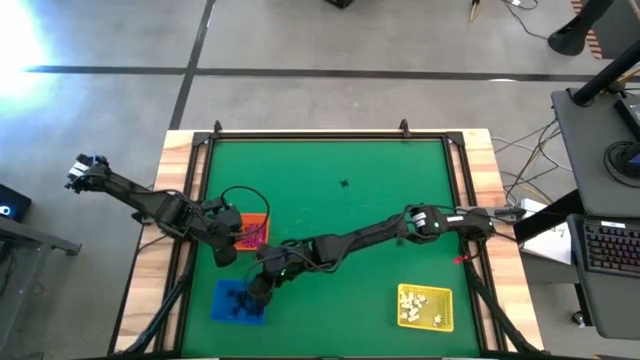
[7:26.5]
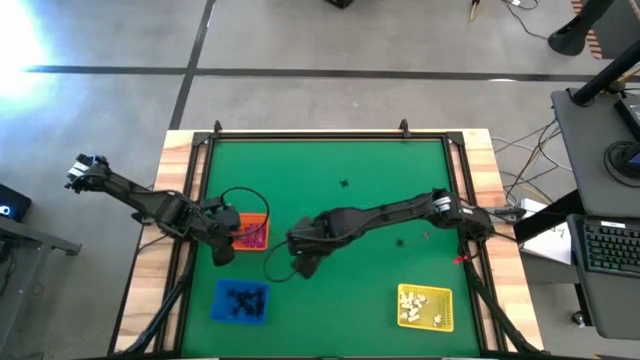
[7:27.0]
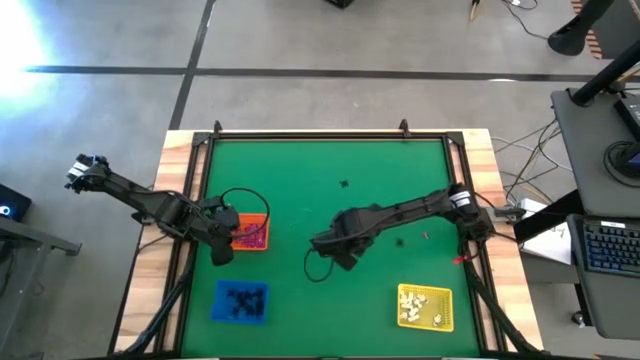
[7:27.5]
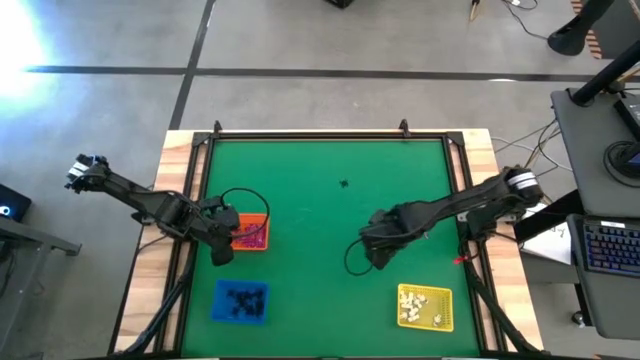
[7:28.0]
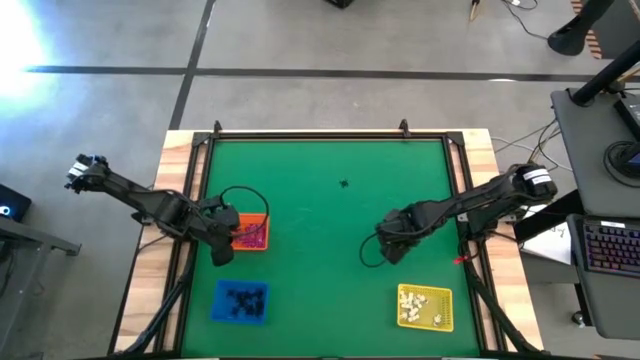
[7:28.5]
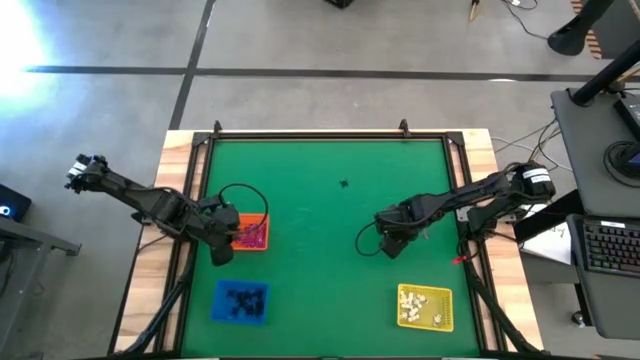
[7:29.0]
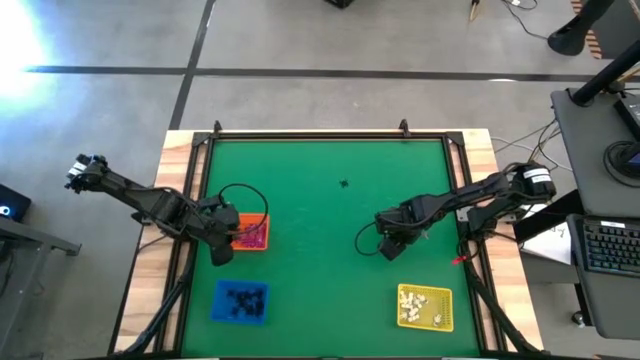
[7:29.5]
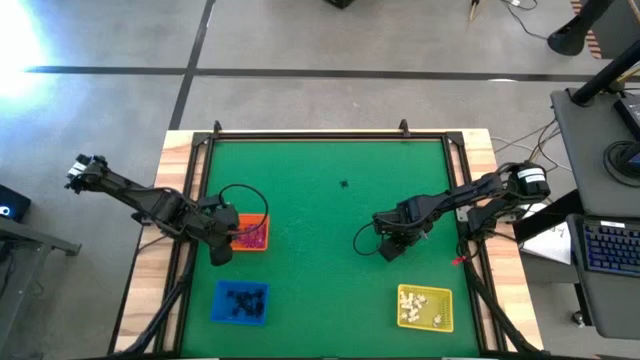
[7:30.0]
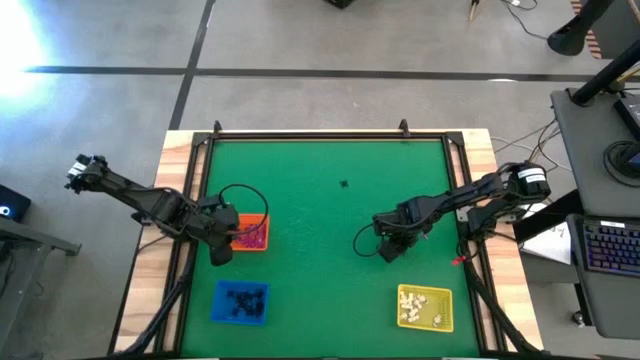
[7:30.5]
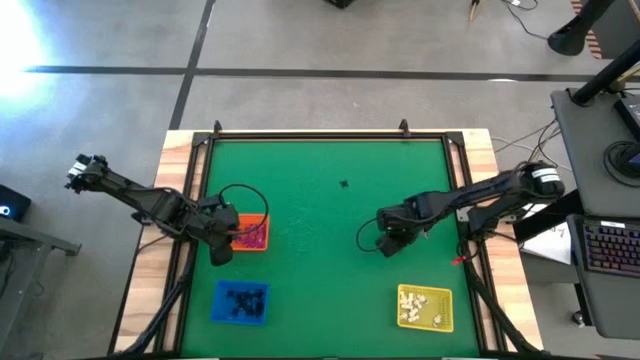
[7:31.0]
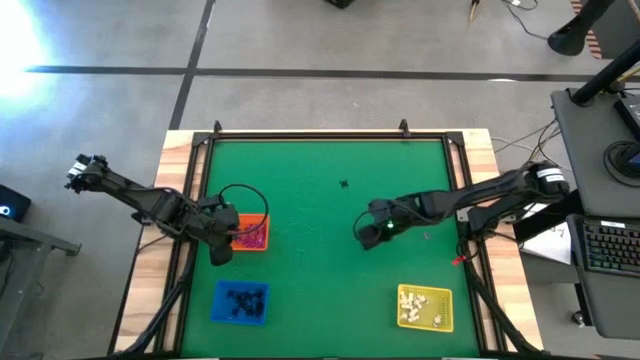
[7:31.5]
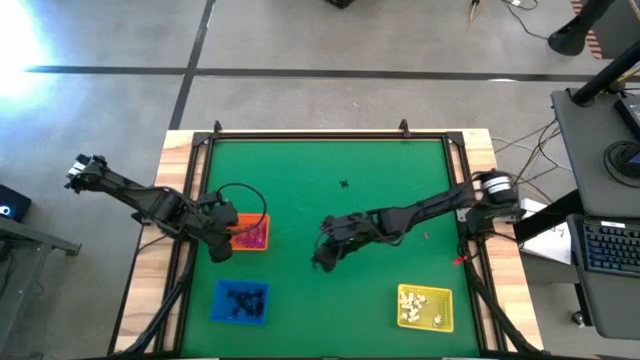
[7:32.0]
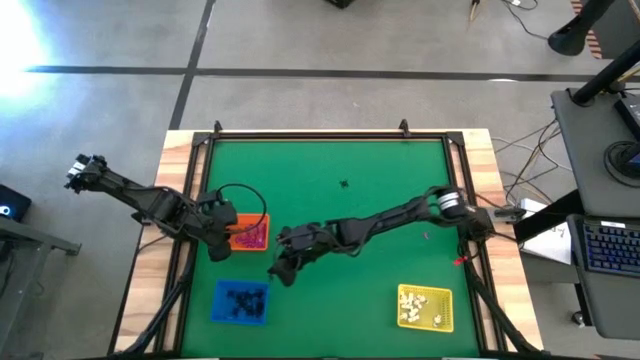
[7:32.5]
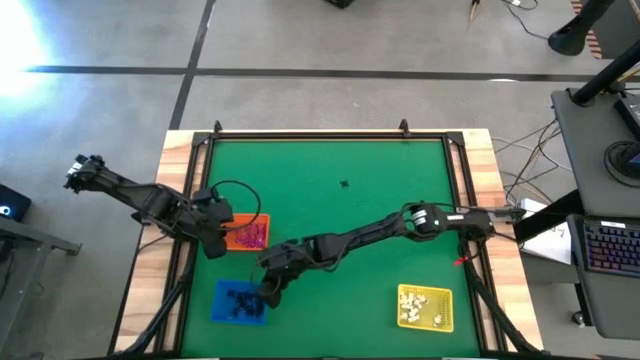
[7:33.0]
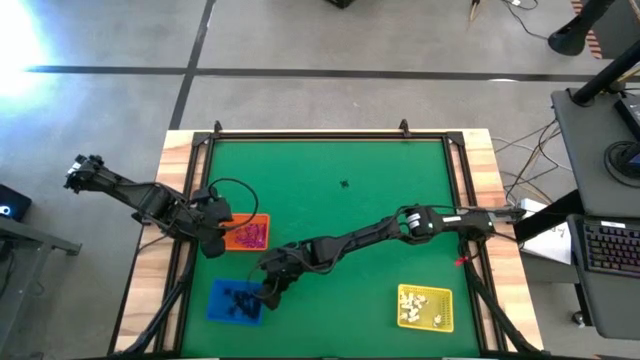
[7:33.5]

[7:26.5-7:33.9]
Task: Sort Halloween decoration
Put the black spider toy into the blue bin

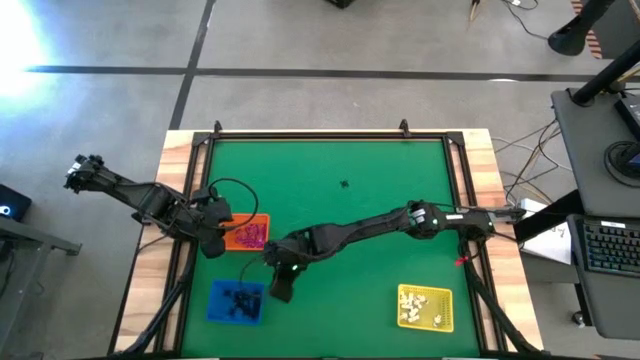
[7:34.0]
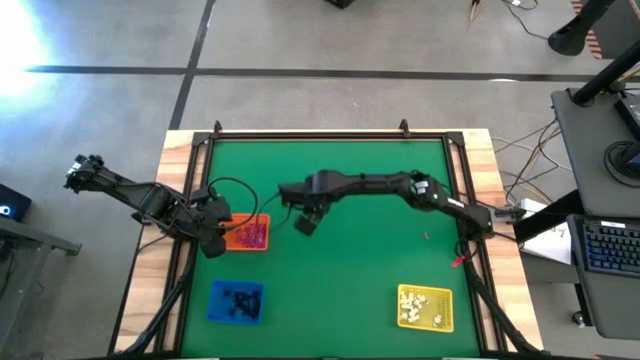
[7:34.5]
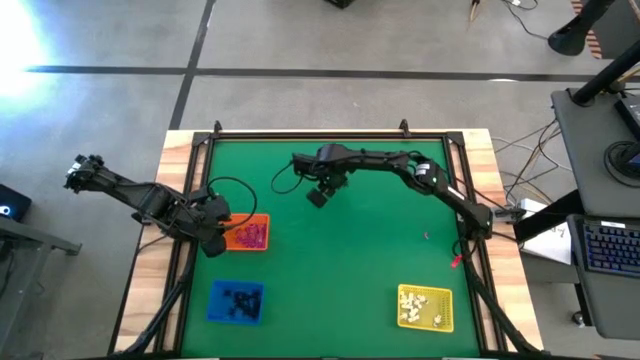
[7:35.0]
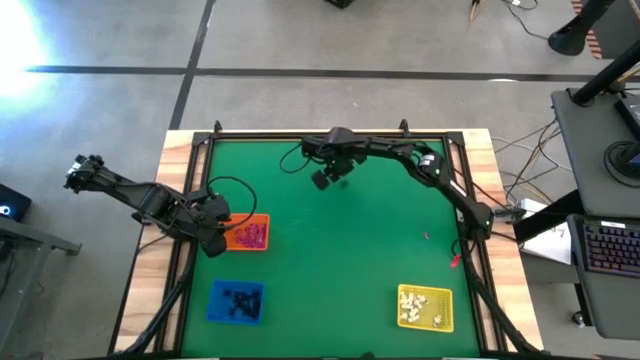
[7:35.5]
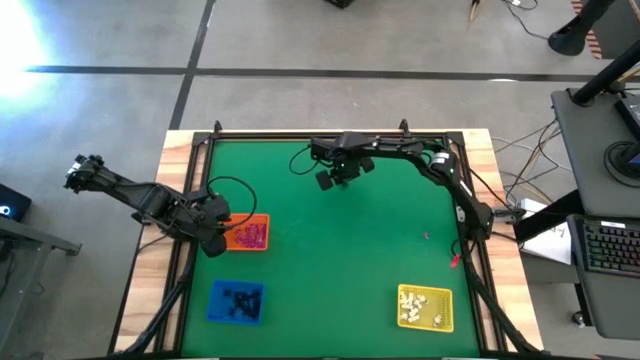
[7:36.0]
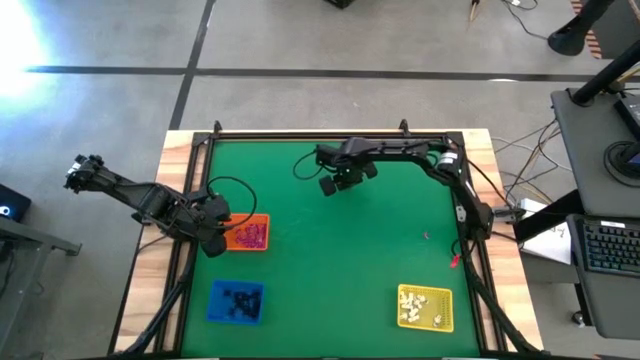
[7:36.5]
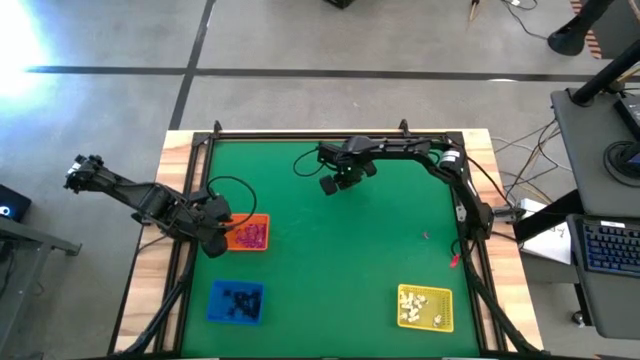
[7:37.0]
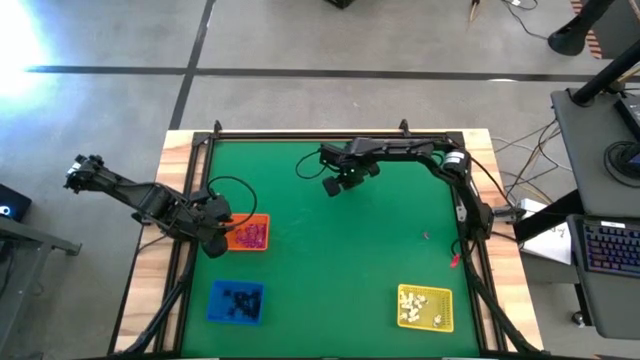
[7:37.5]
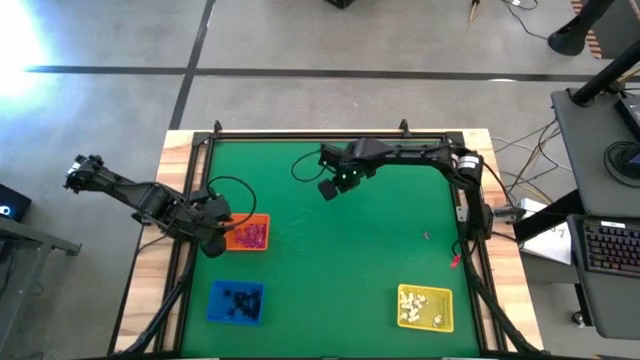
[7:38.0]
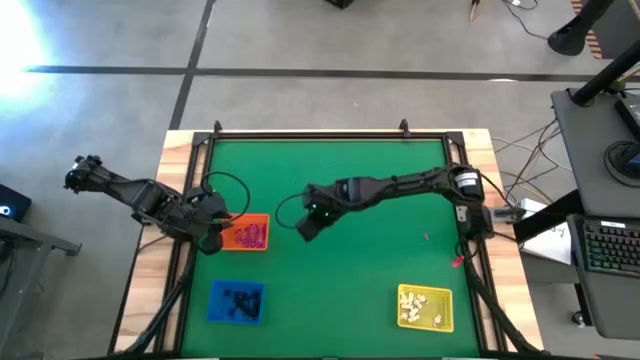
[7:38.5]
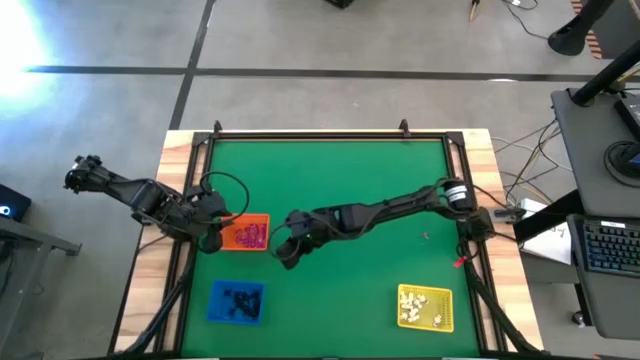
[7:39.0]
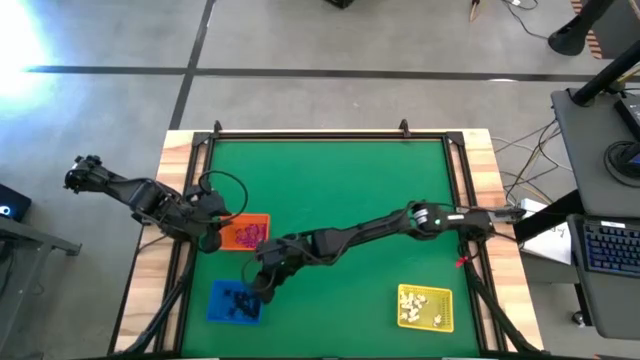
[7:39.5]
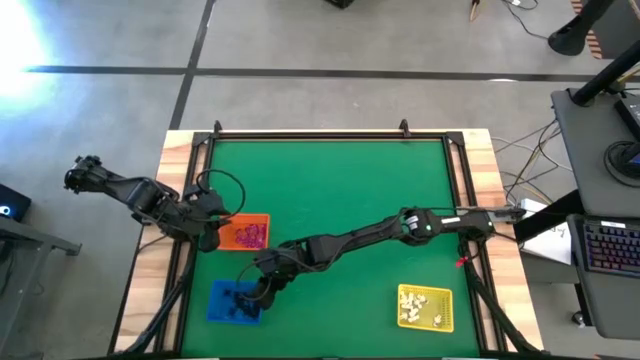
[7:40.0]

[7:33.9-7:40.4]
Put the black spider toy into the blue bin

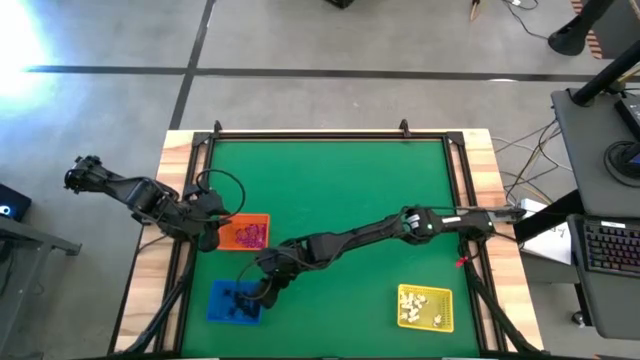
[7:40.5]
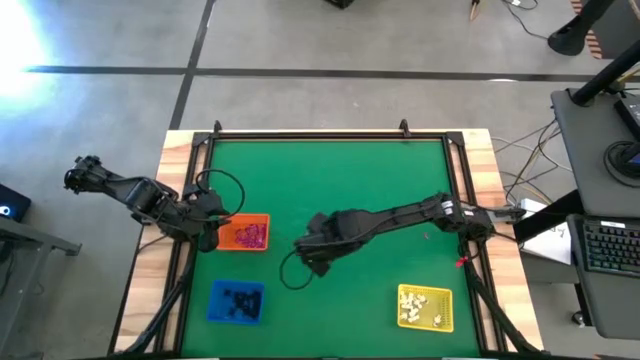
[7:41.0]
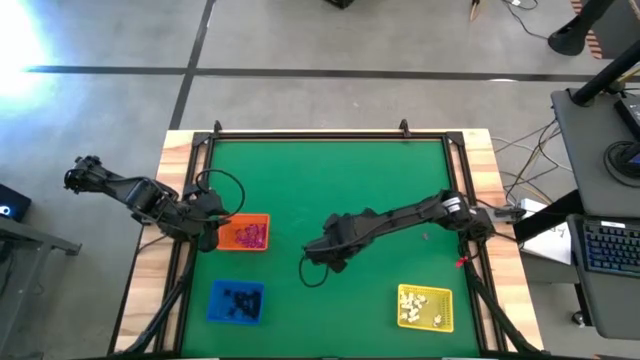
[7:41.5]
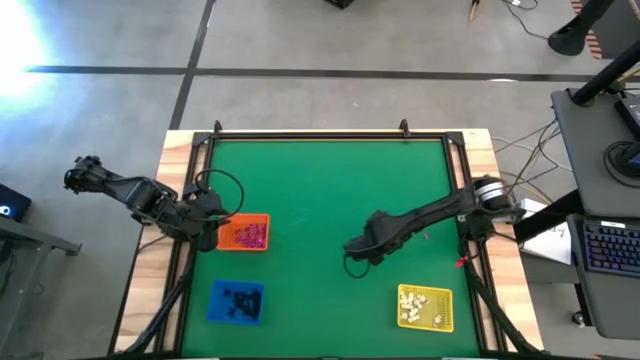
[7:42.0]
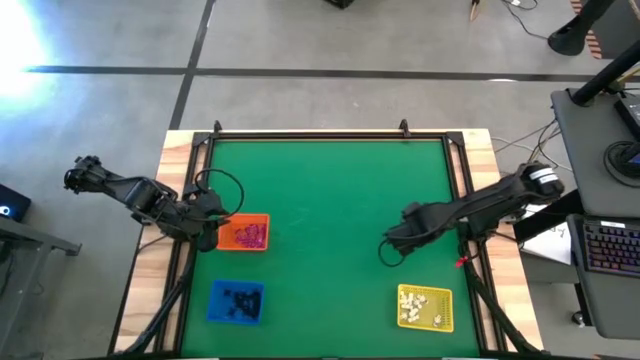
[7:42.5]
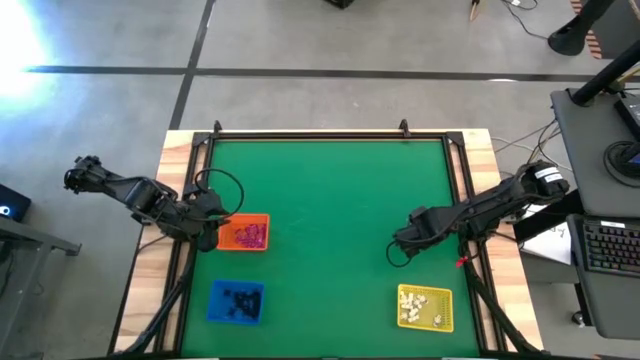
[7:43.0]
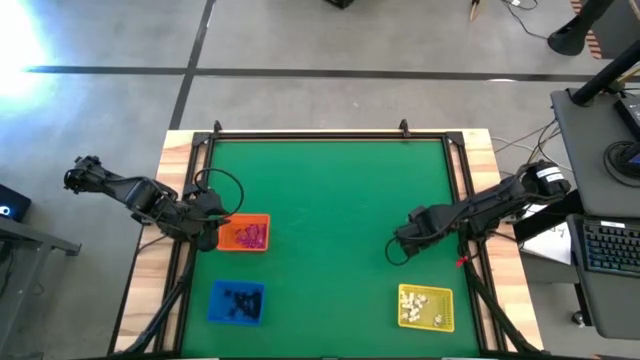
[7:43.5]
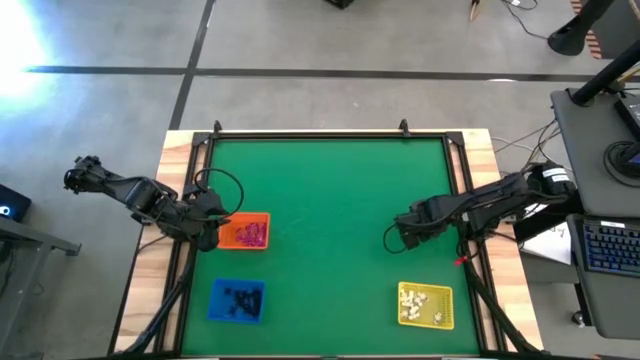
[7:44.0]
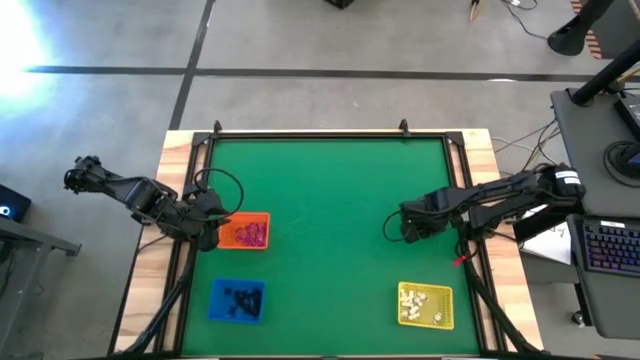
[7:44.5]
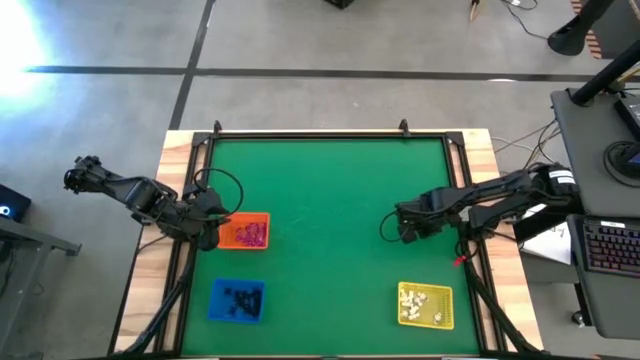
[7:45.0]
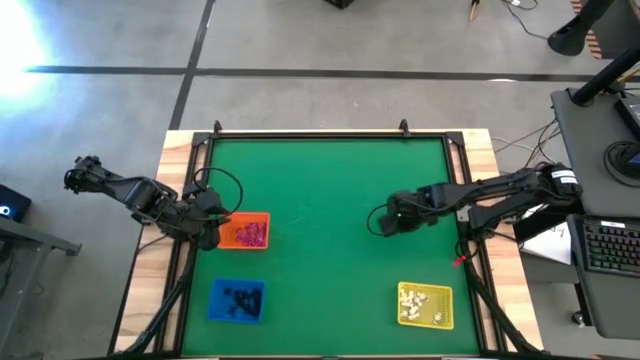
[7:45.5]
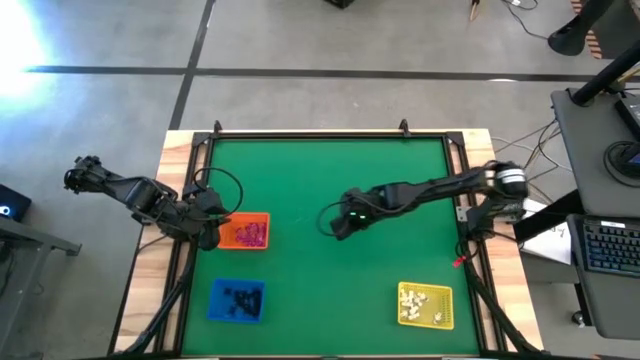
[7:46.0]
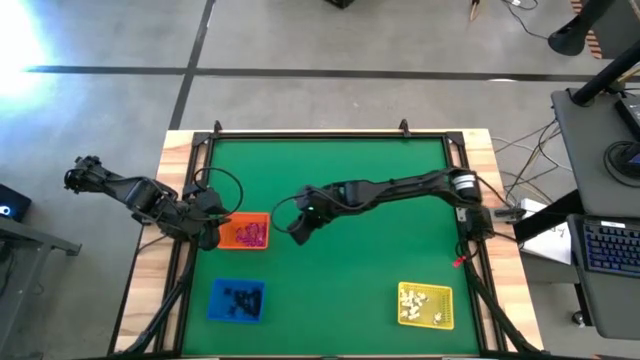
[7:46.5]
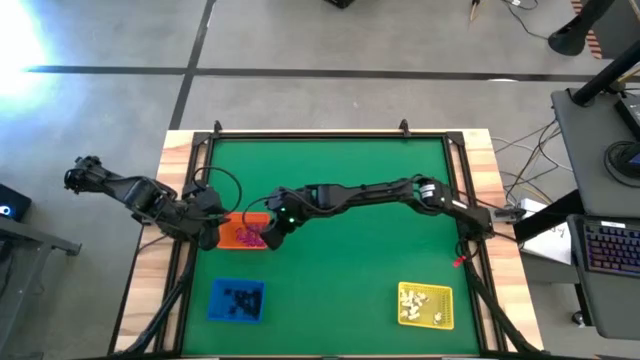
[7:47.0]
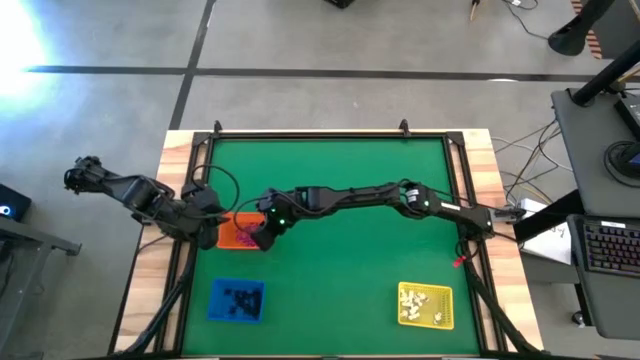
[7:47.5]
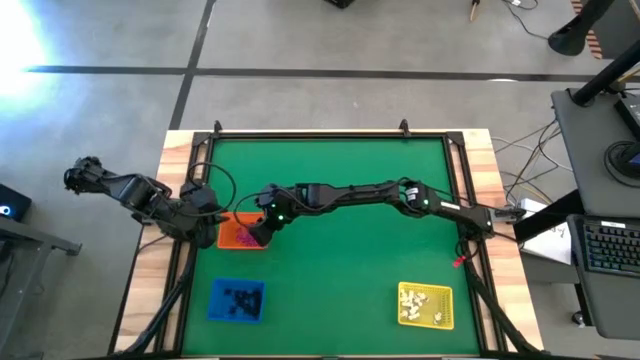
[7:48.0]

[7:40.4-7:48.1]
Put the violet witch hat toy into the orange bin
